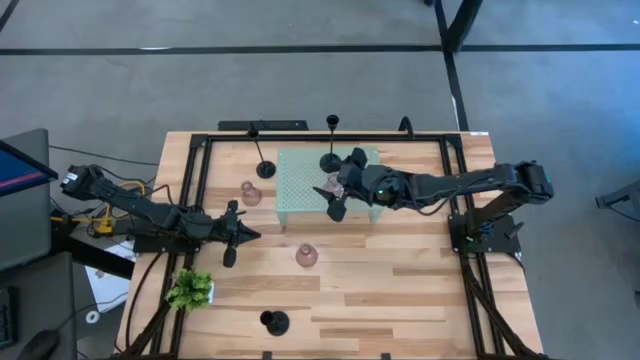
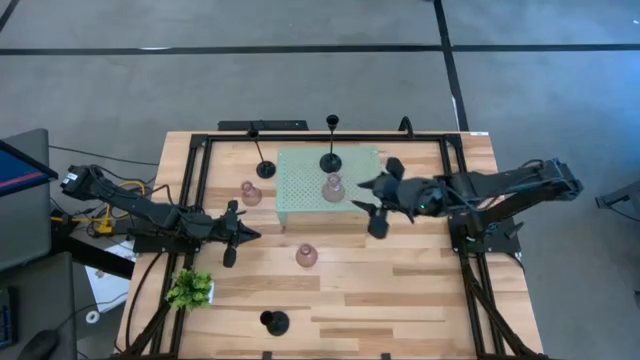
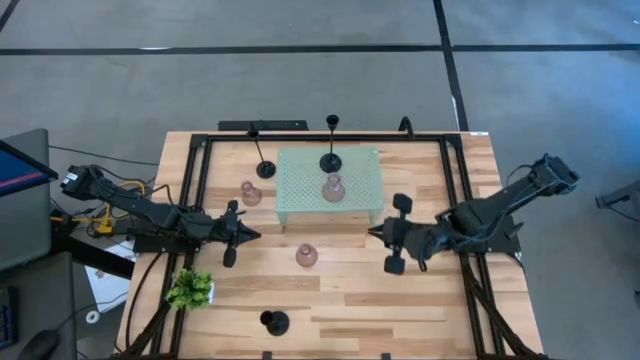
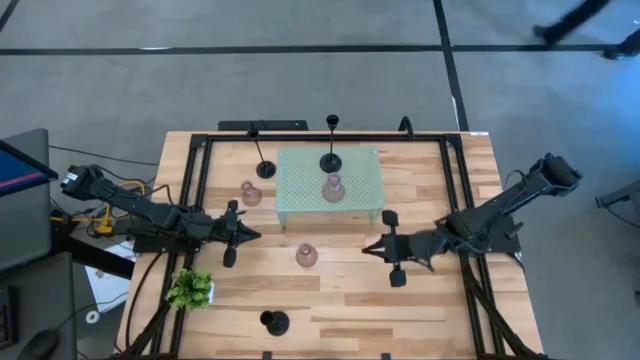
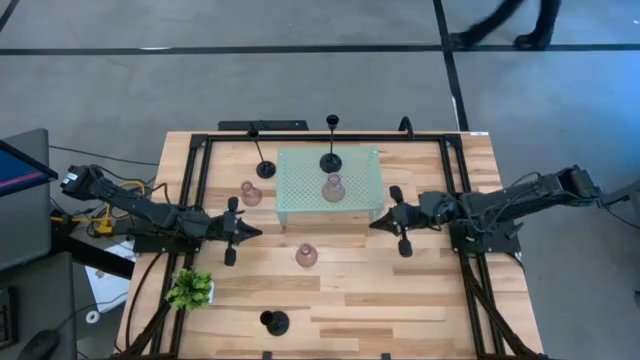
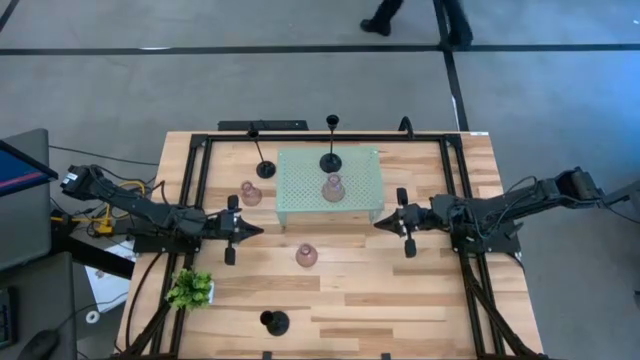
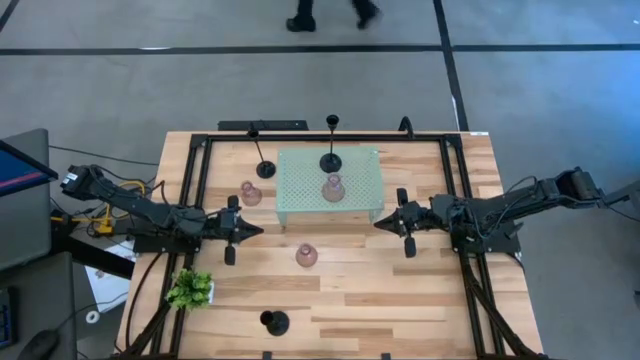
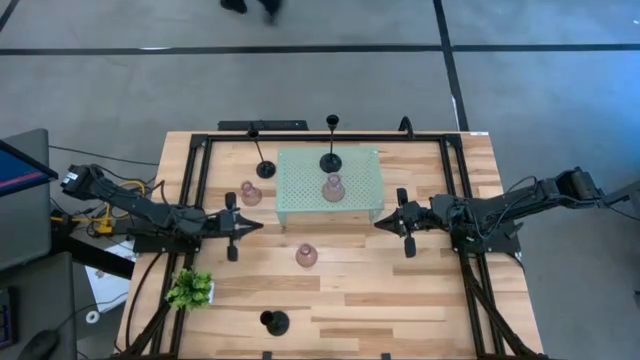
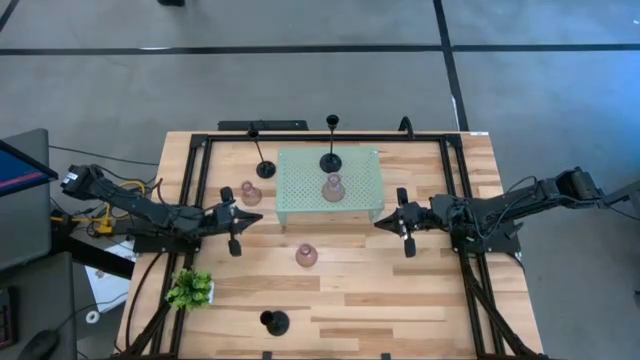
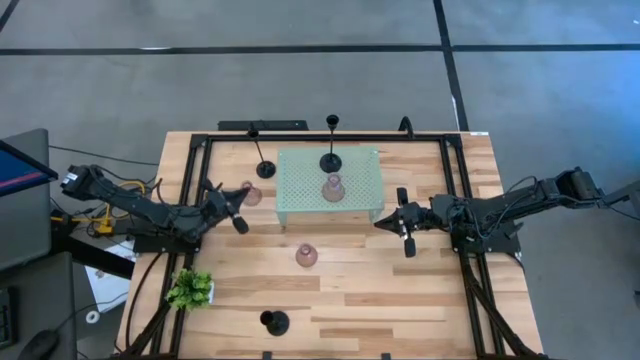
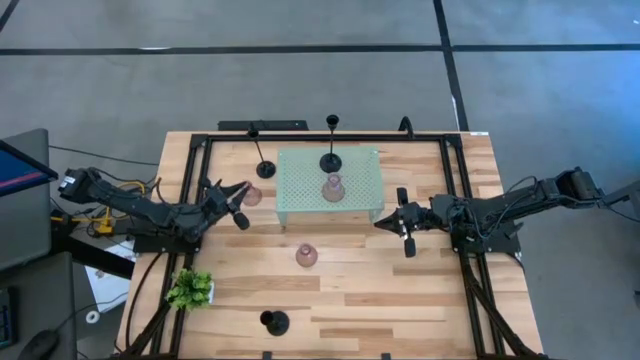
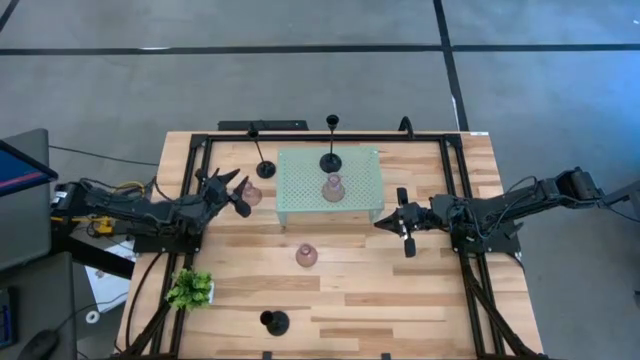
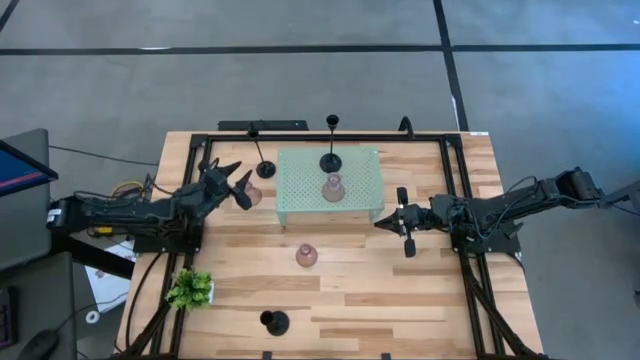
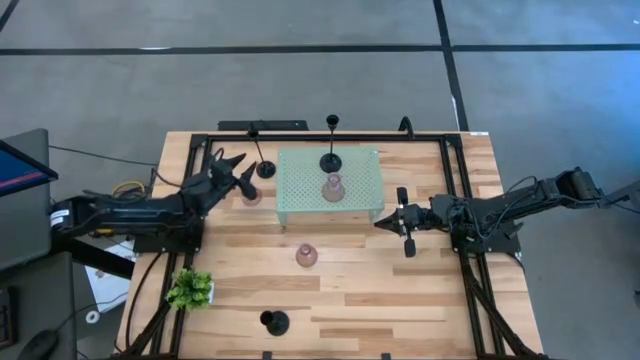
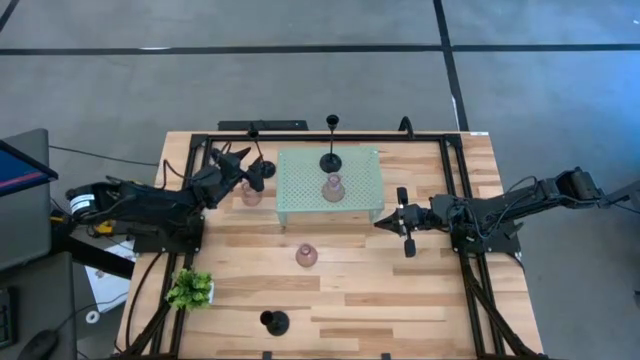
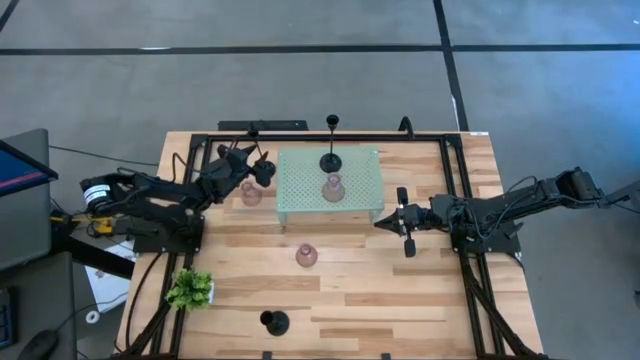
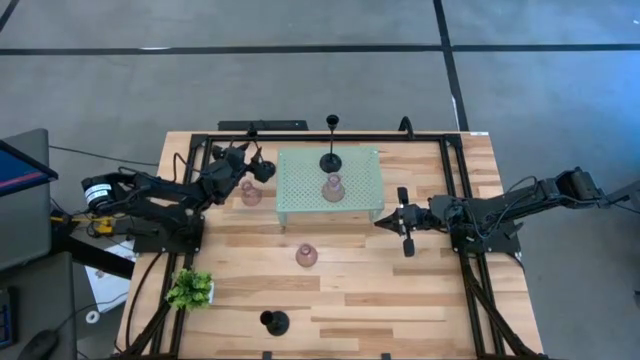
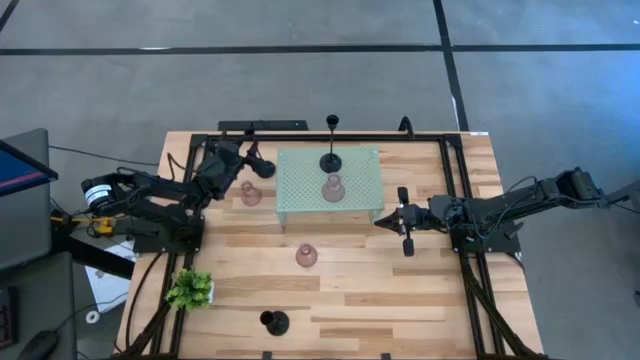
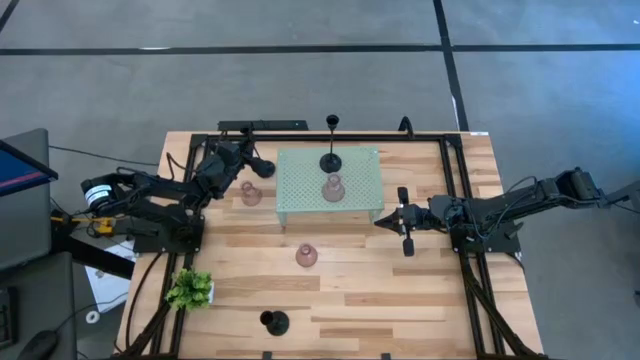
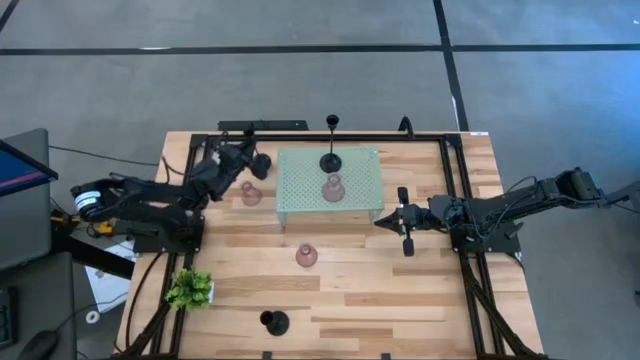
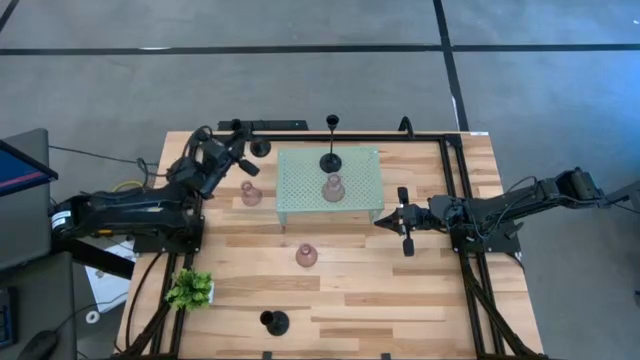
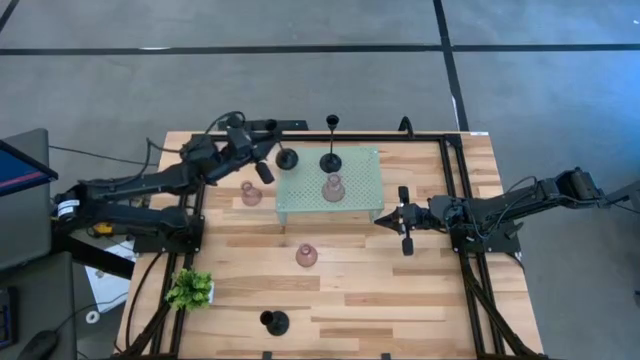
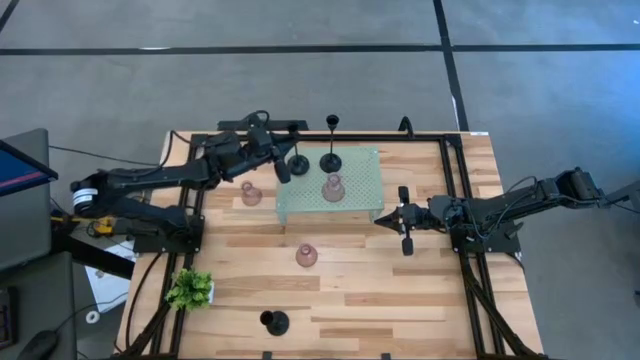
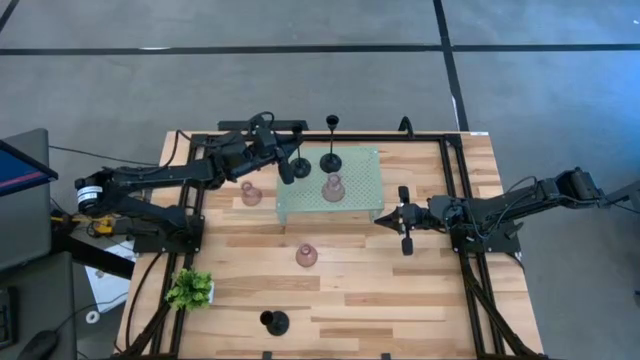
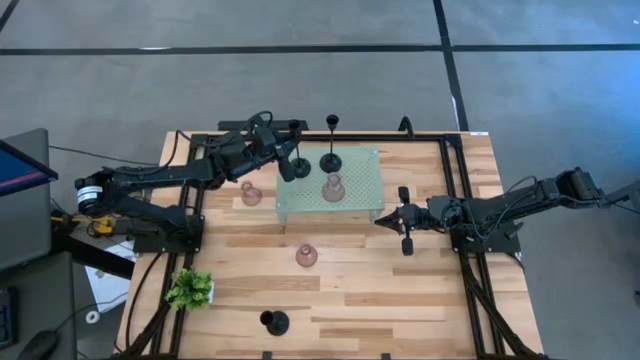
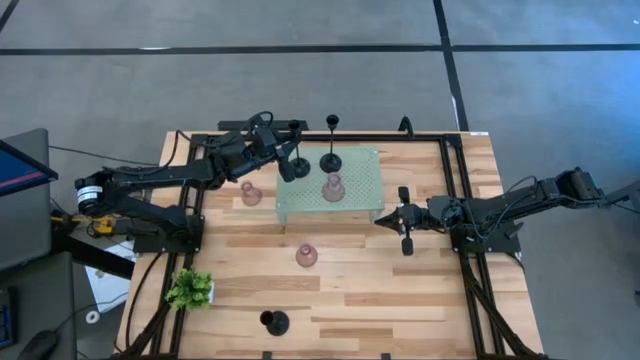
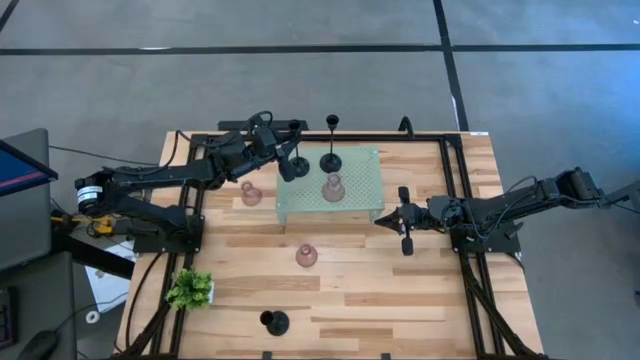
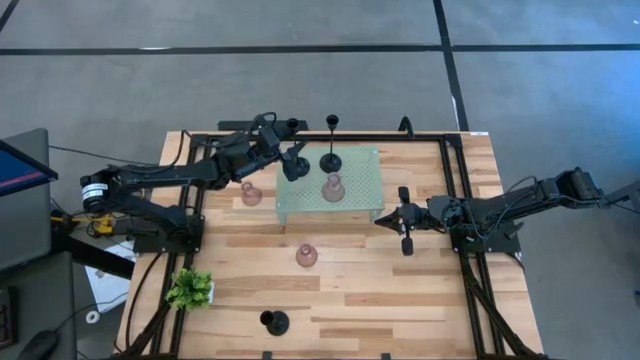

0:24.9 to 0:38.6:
Task: Pick & Place candle stick holders
Put the top black candle holder on the shelf

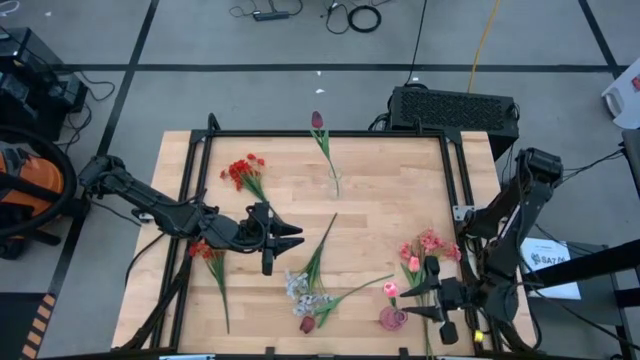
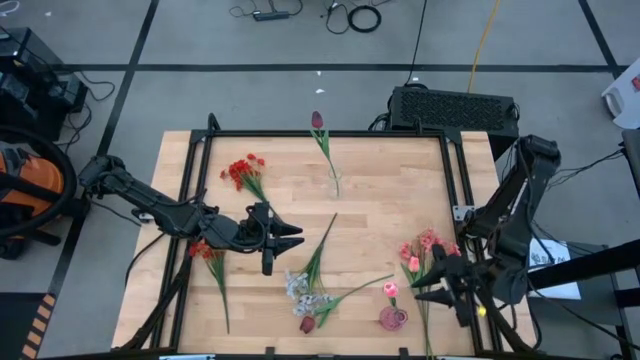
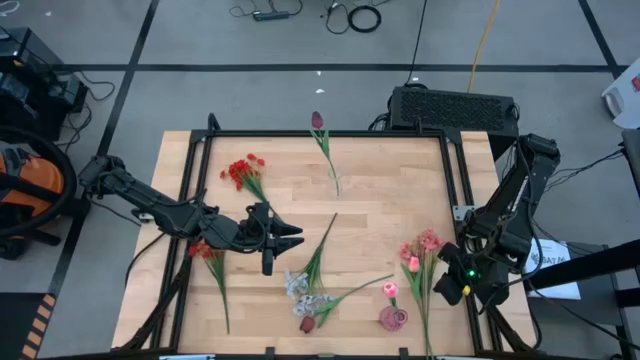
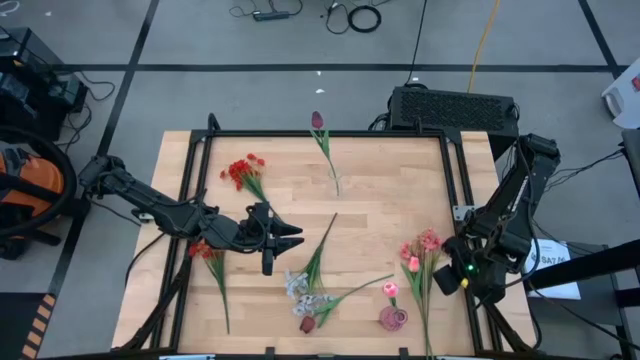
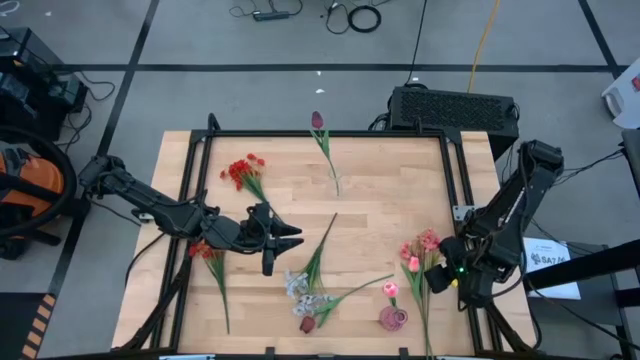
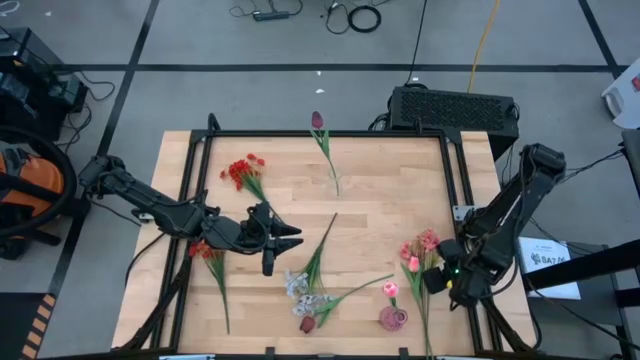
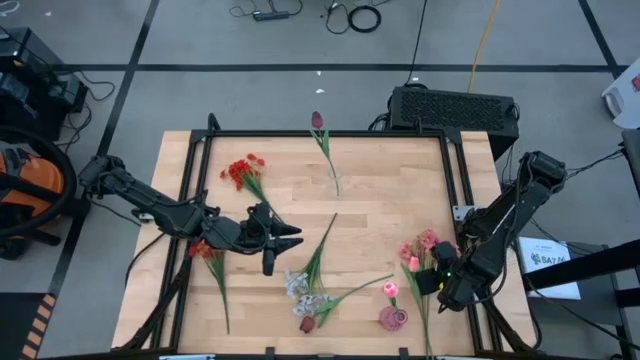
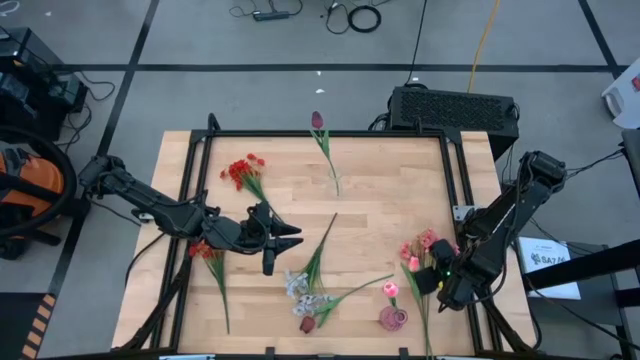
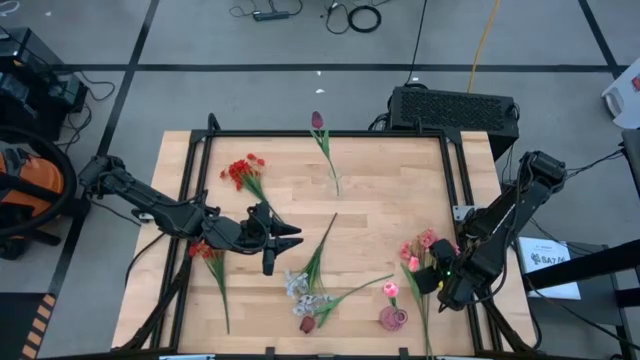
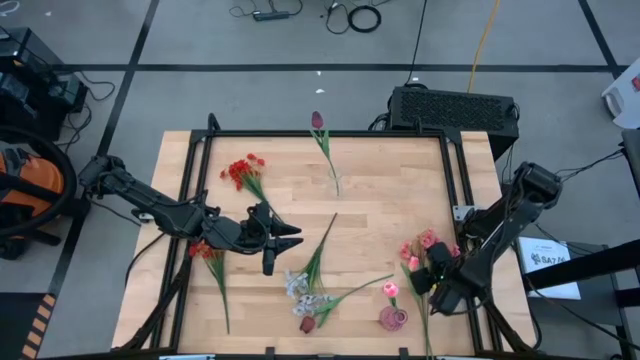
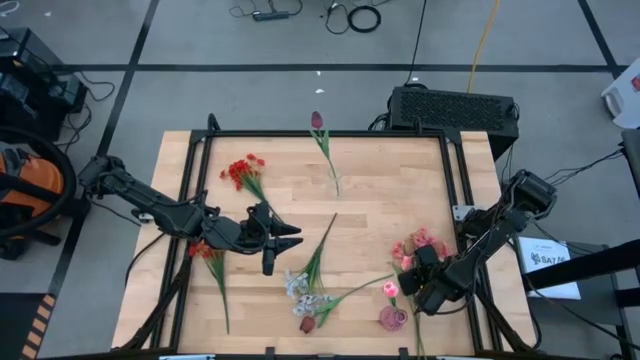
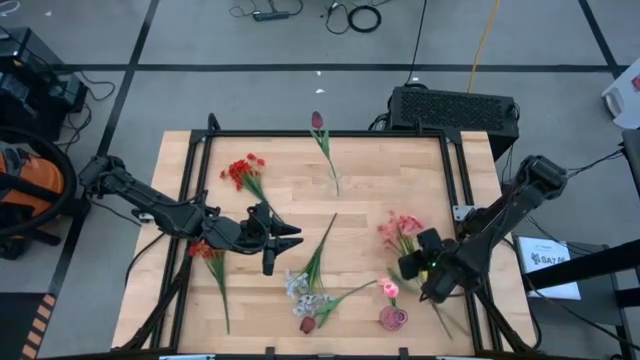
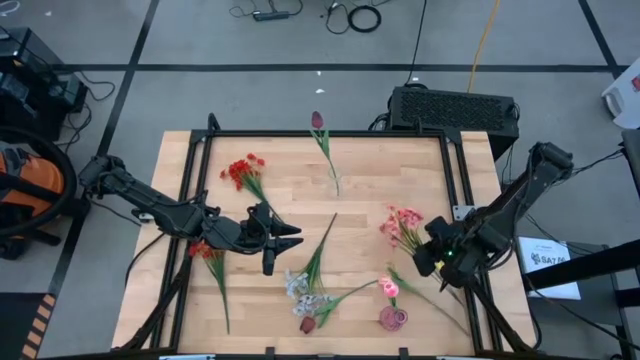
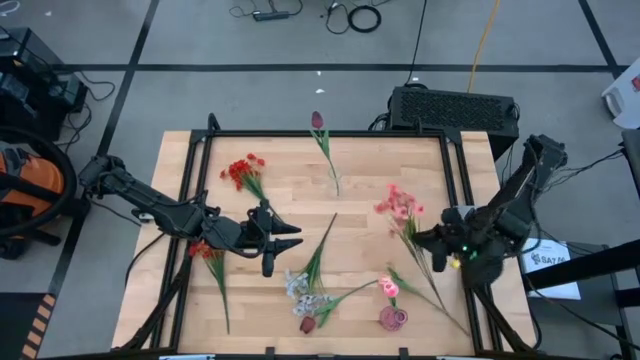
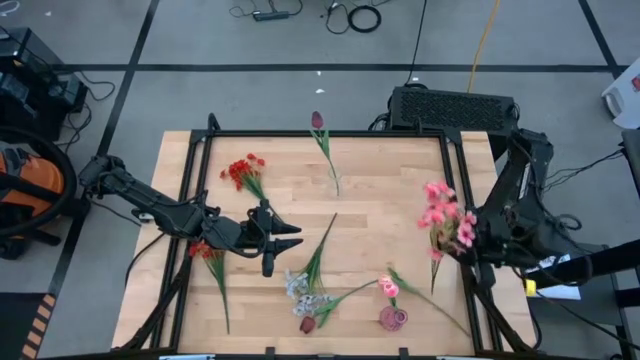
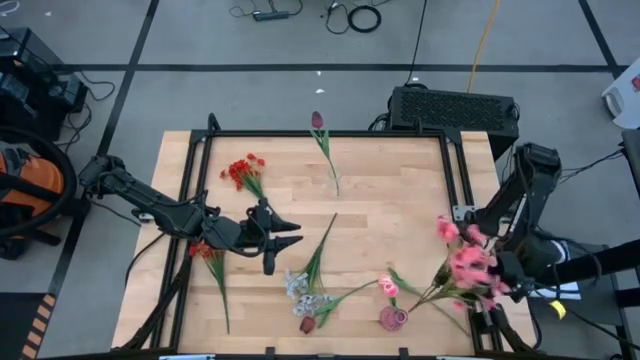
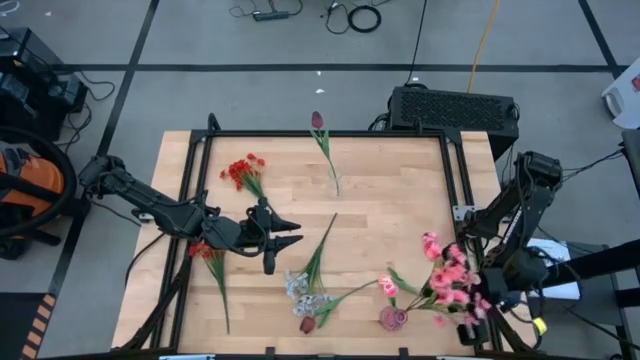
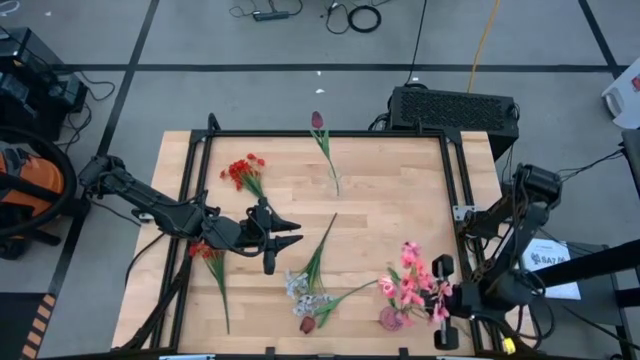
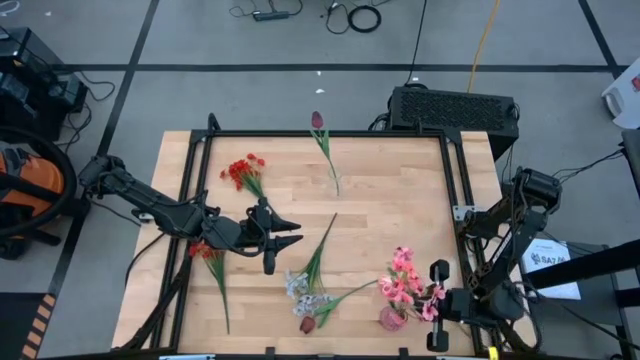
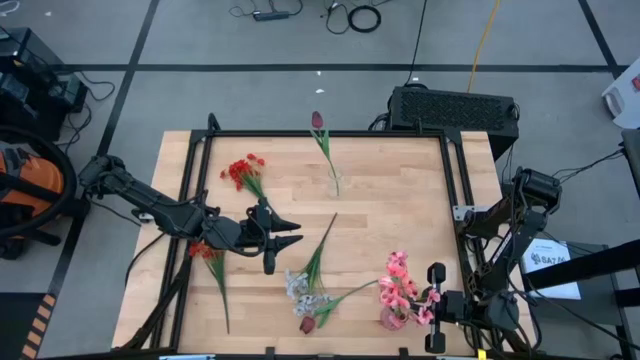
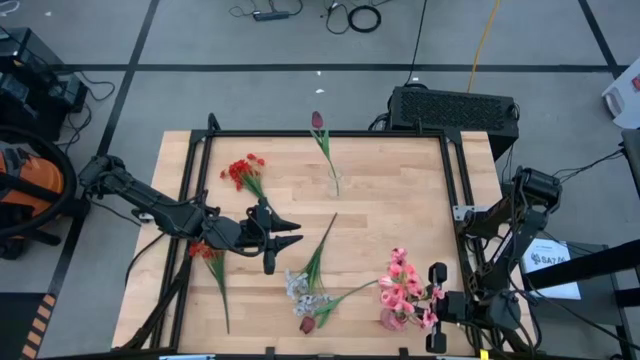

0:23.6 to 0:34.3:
Task: Sort flowers into vase by color
Put the pink flower into the purple vase
